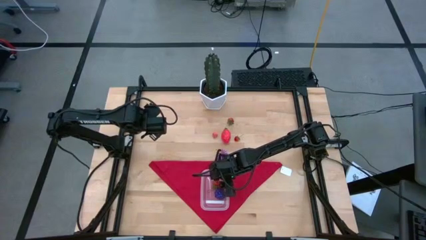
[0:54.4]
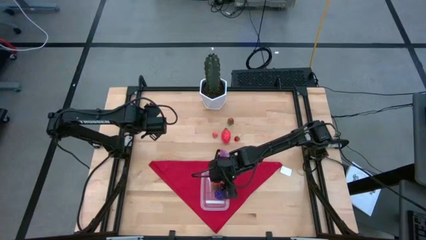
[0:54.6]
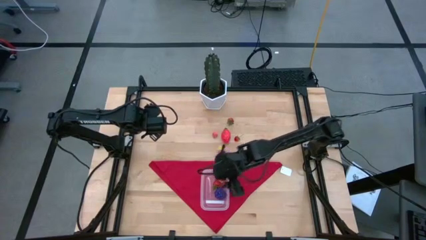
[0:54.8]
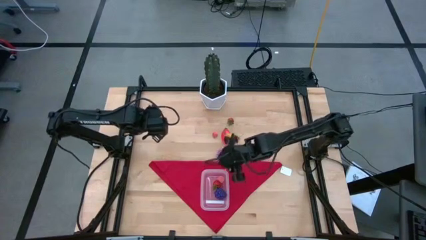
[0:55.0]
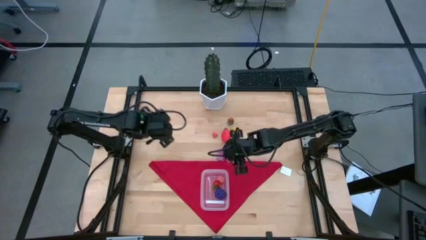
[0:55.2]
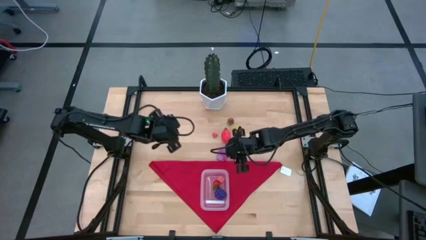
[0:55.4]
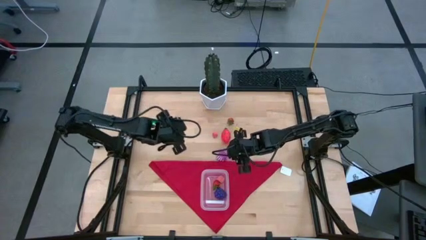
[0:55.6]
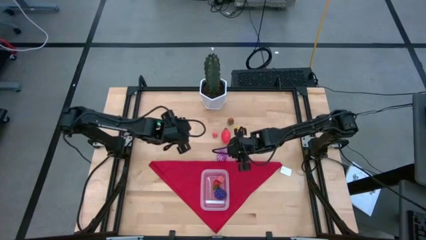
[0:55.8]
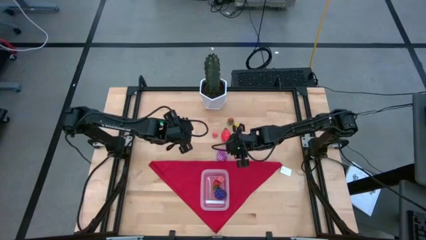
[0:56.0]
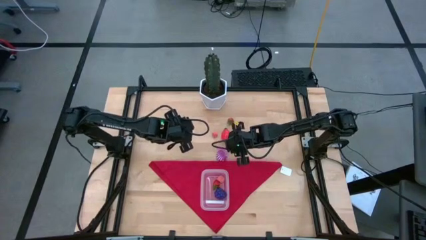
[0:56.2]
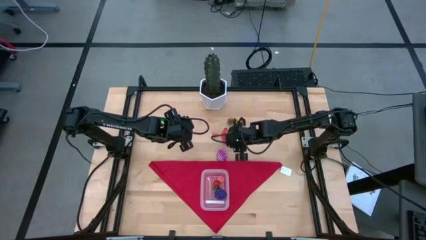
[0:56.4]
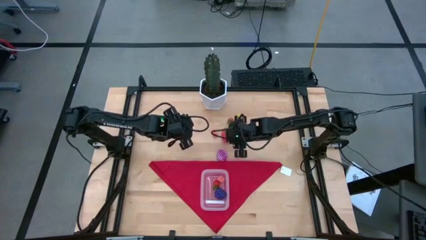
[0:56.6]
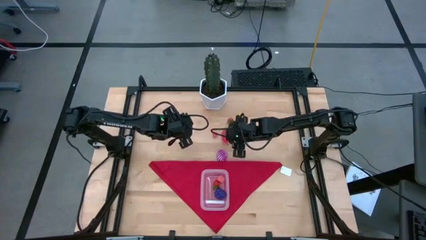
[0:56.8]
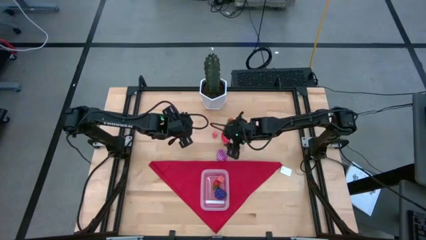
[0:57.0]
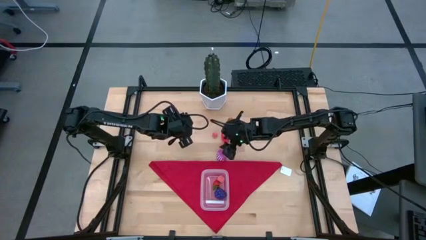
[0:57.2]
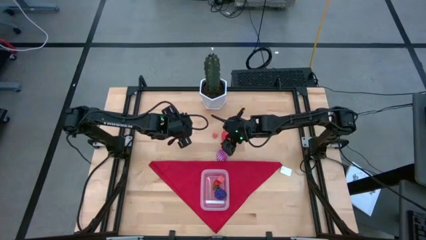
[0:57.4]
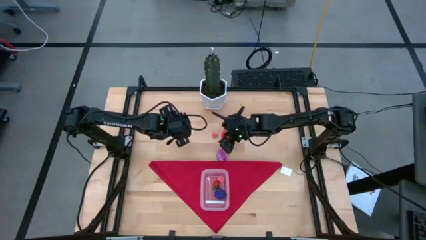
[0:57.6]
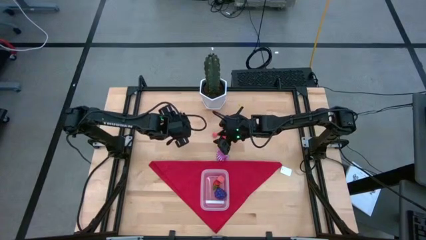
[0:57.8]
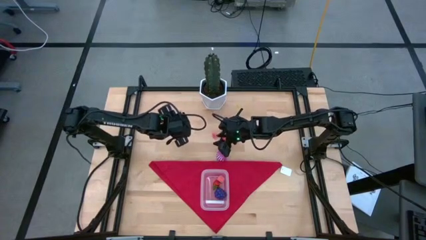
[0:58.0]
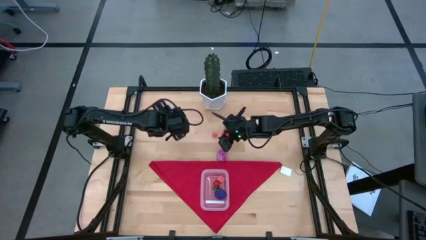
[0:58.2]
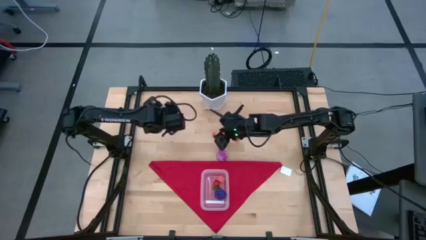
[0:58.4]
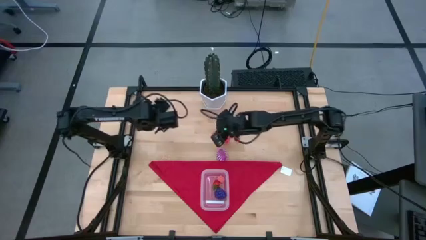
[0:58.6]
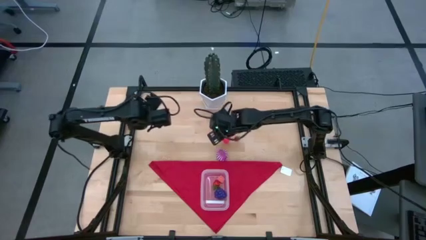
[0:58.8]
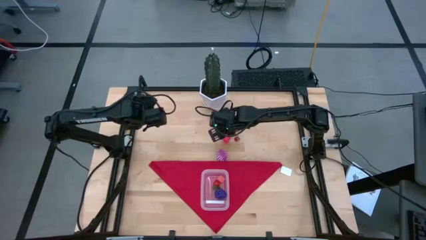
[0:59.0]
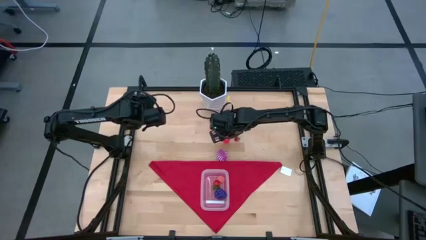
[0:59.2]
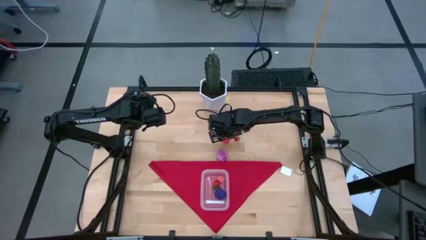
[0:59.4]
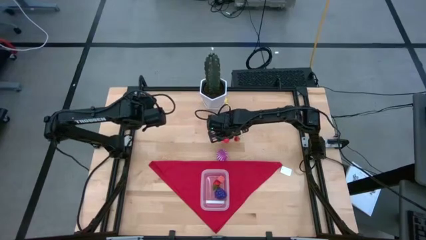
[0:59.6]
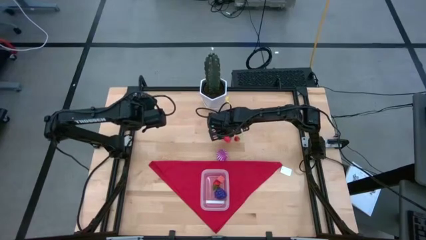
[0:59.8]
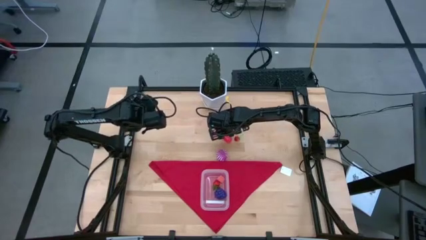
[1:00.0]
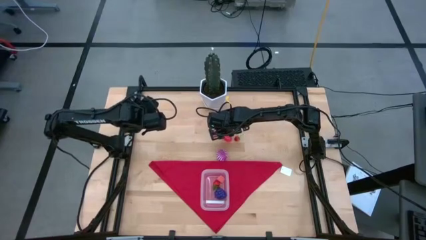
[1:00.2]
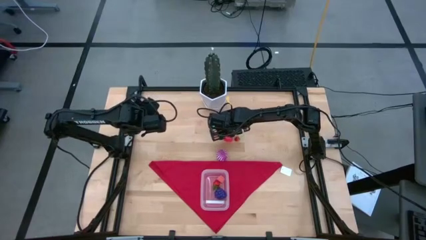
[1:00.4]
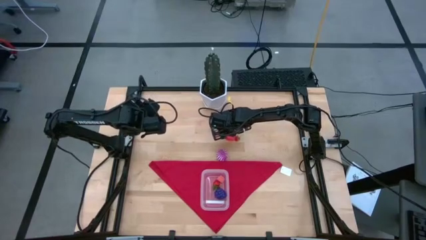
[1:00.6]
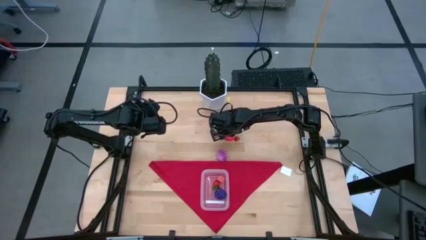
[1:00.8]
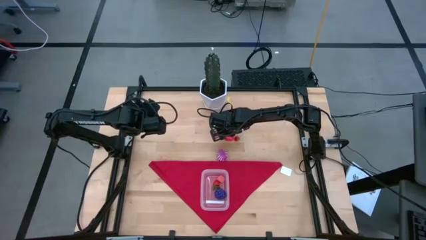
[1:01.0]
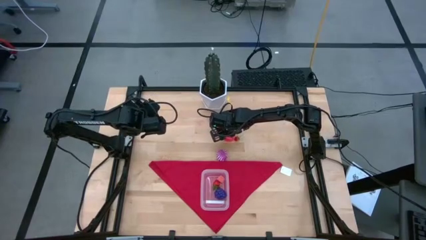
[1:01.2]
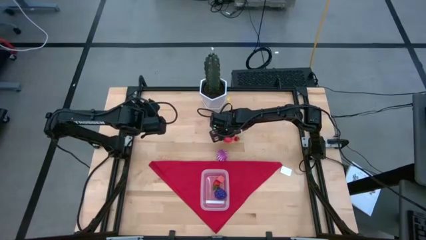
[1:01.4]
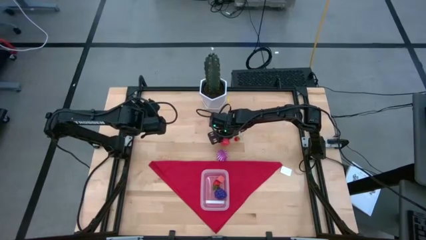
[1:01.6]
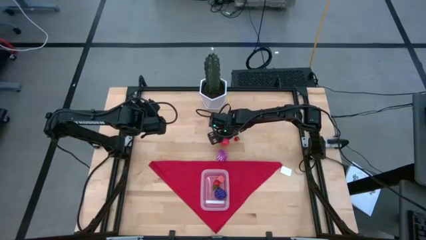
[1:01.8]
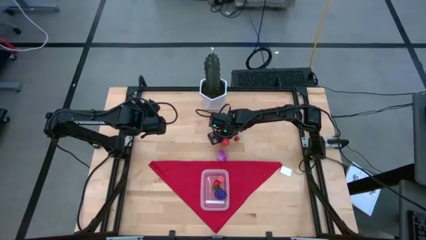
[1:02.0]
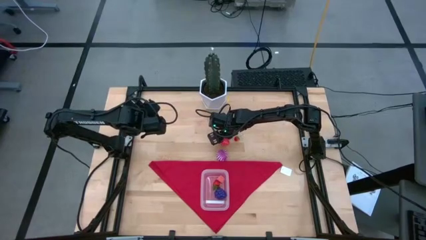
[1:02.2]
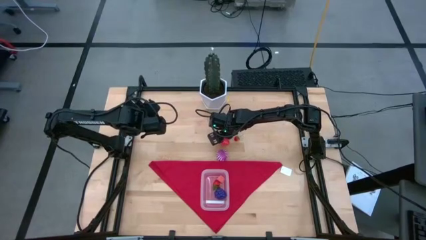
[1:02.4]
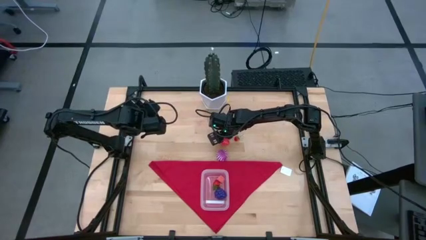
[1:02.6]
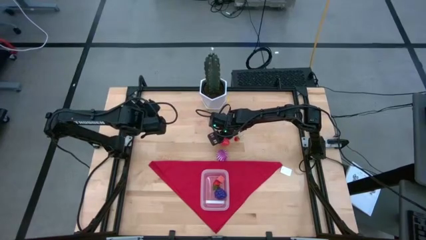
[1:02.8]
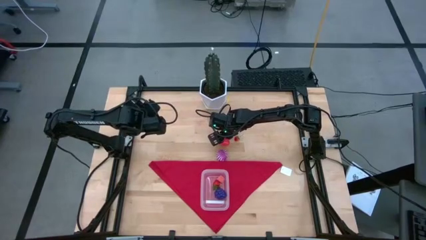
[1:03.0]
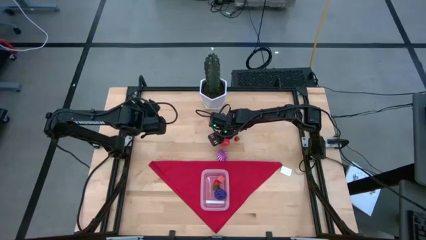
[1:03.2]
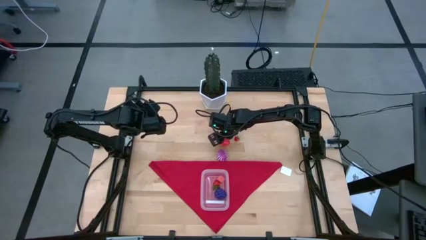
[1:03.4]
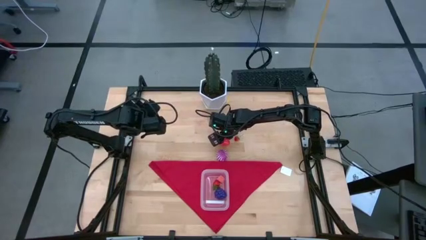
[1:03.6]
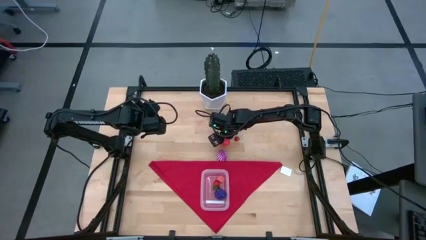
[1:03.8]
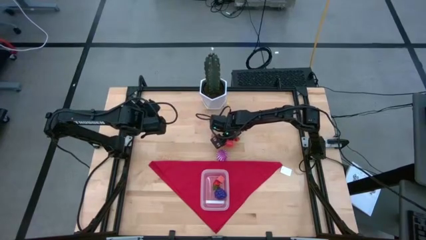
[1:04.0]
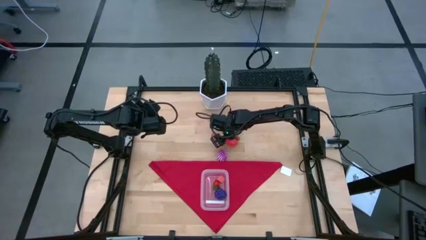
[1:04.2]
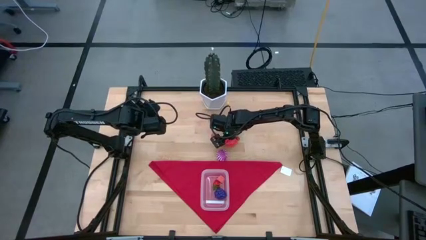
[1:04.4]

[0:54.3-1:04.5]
Task: Pick and placing Produce into tupperware
Put the dragon fruit into the transparent bin
